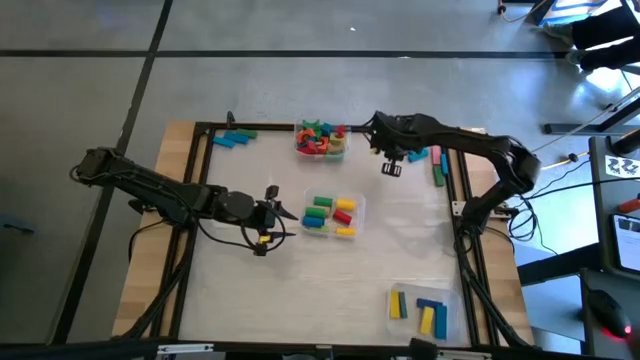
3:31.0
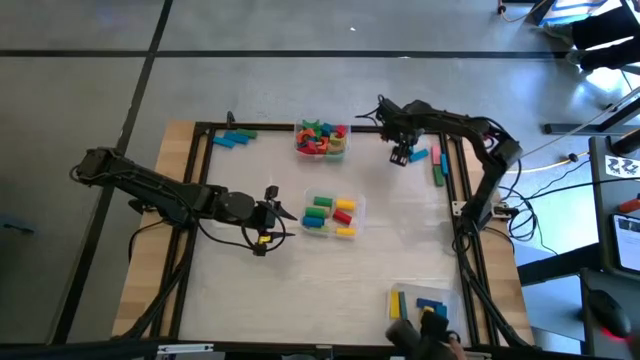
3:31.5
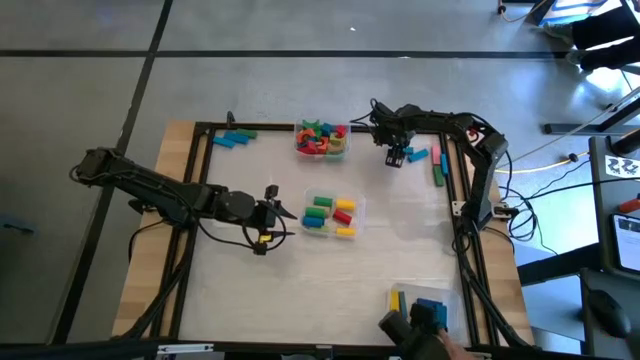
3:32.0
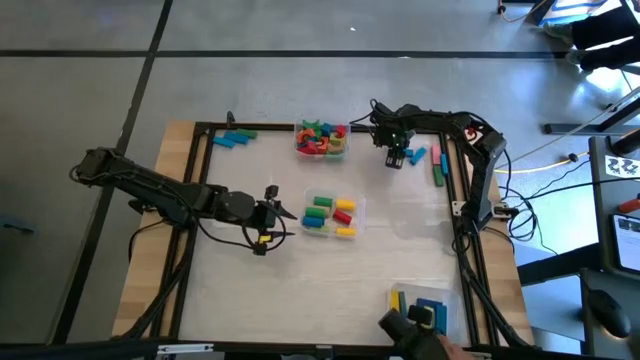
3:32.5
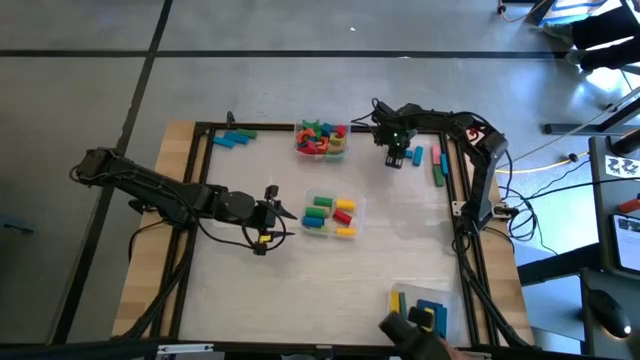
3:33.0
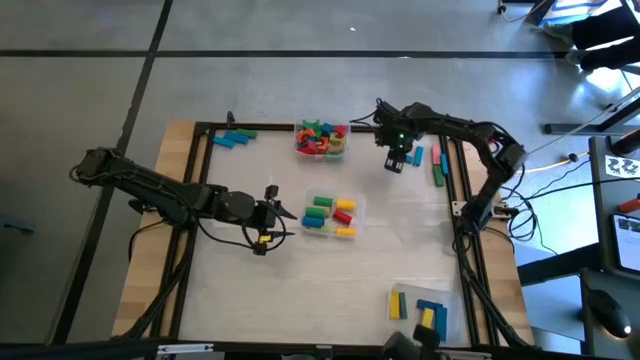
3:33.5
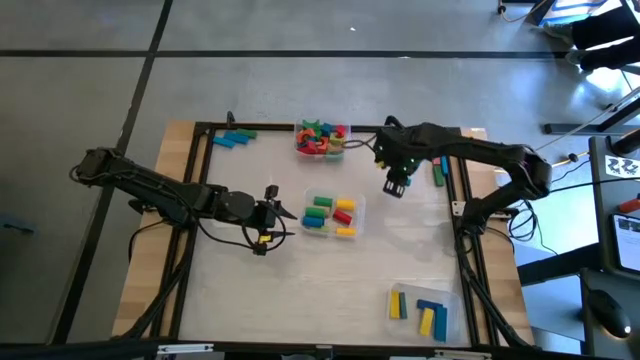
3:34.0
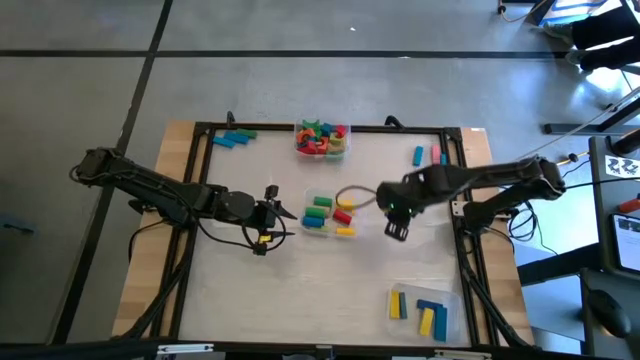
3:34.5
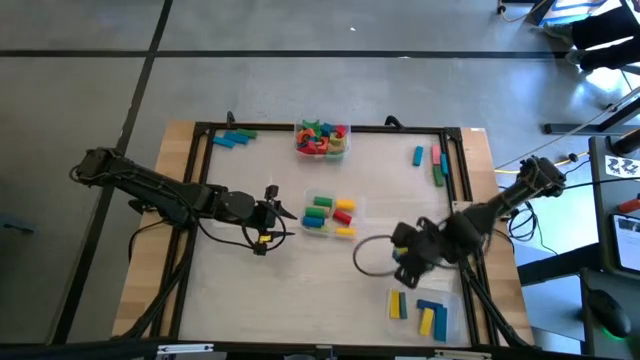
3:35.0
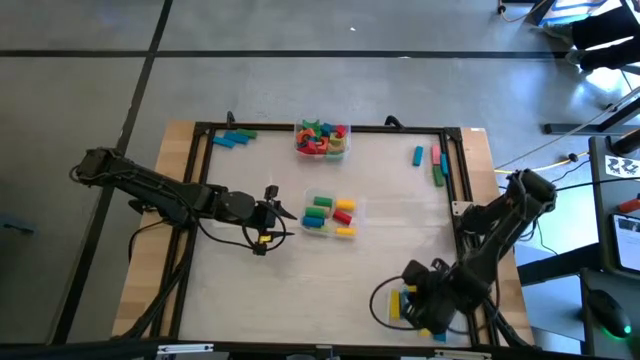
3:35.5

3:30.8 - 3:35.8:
Task: Sort blocks by size
Put the light blue rectangle block into the bottom transparent bin

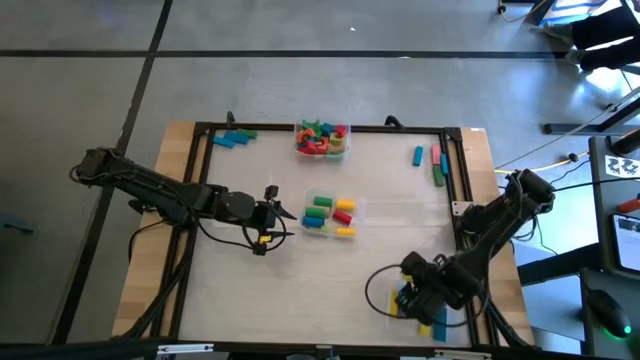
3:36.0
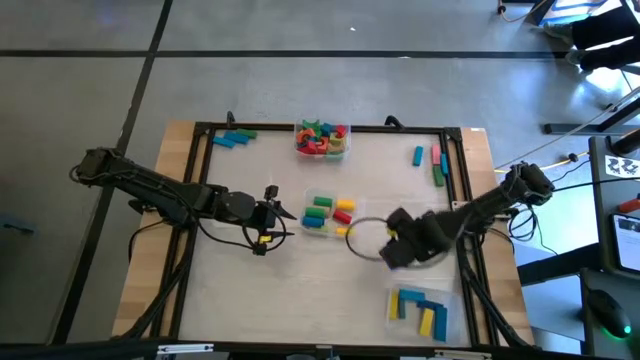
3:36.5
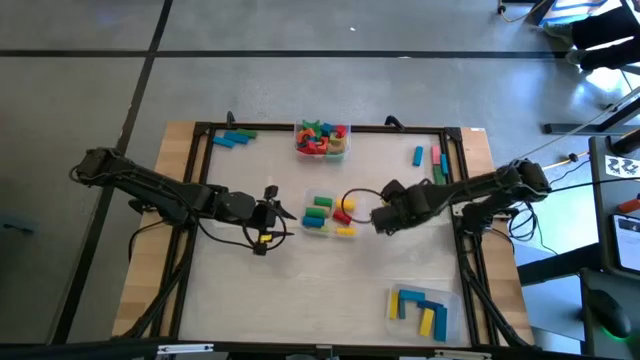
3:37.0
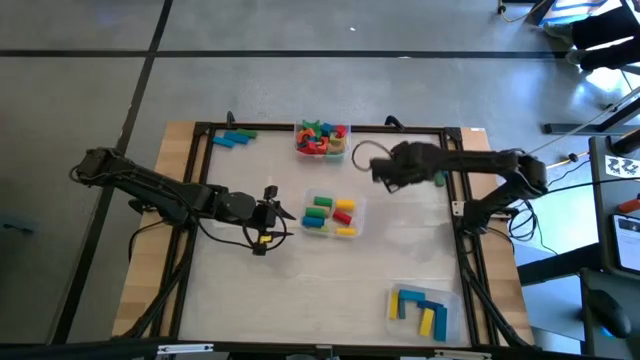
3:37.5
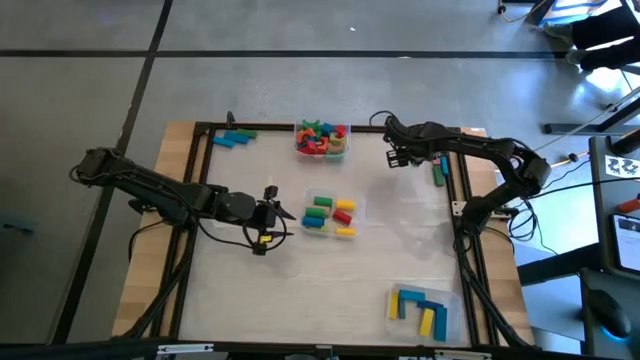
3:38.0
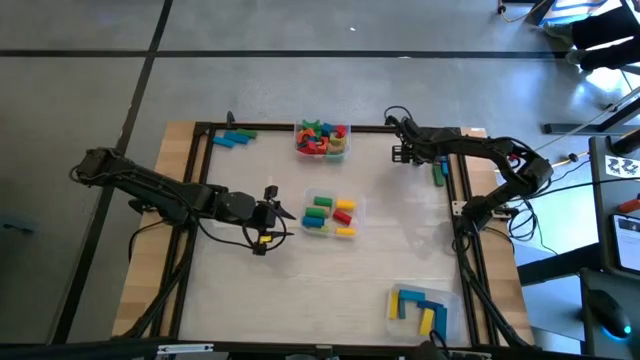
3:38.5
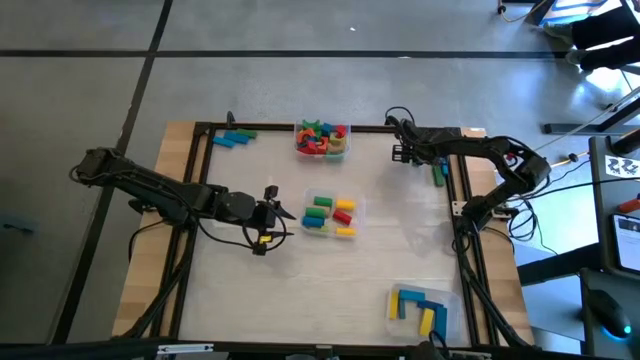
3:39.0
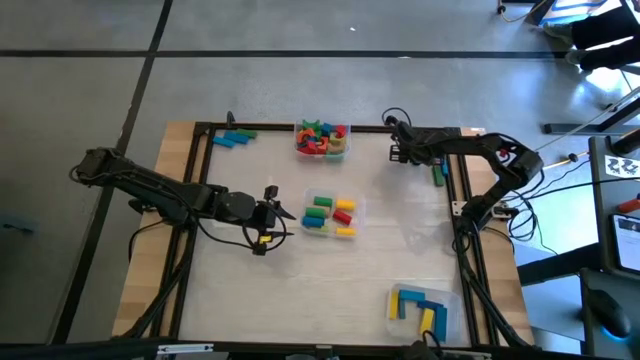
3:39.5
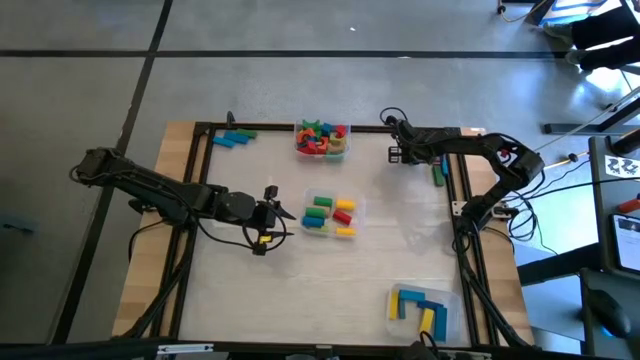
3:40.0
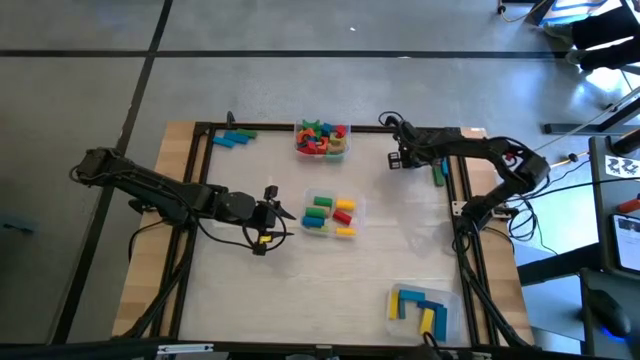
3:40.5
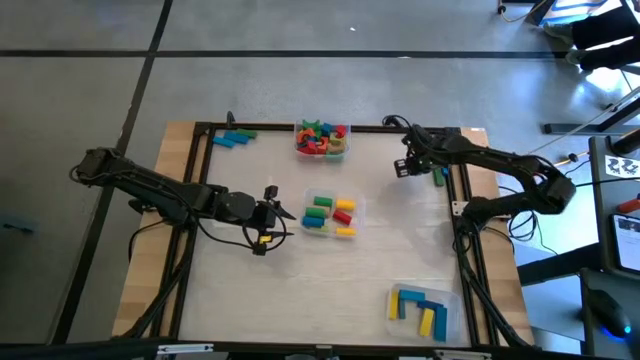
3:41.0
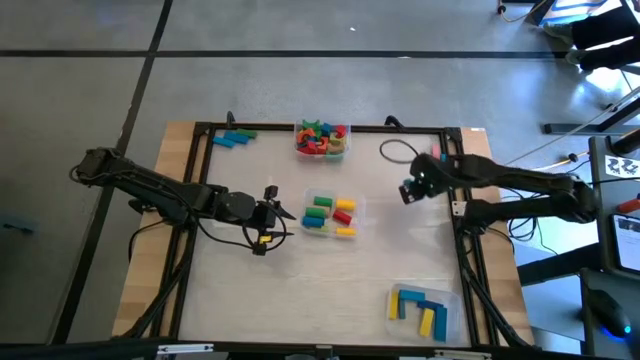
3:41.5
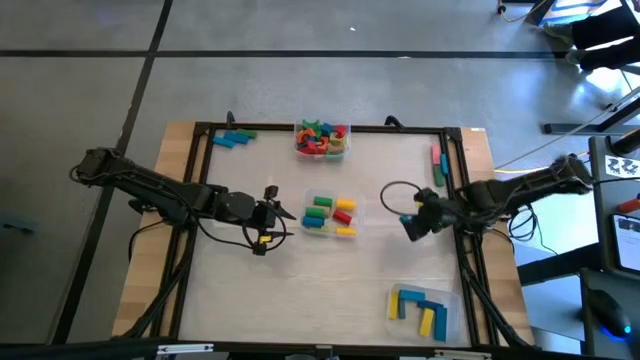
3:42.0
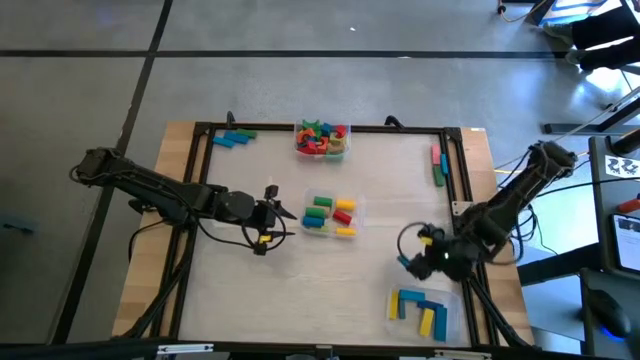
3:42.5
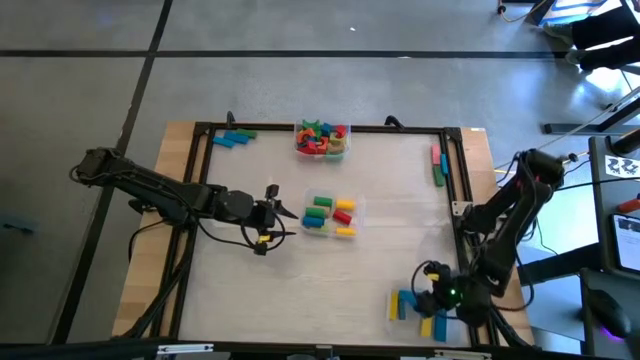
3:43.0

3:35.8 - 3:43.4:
Put the light blue rectangle block into the bottom transparent bin

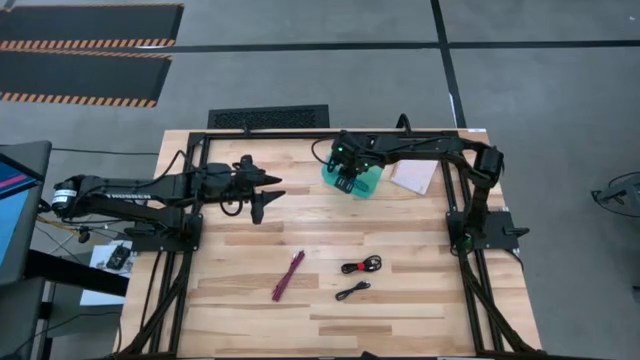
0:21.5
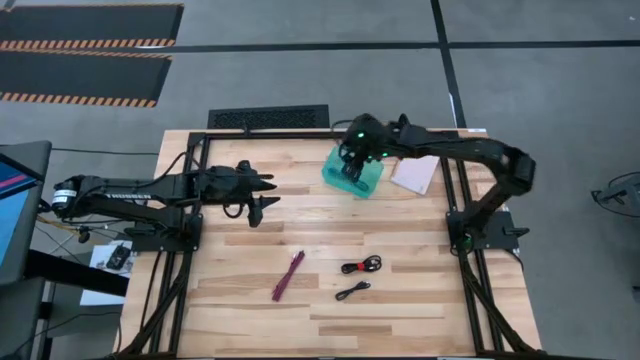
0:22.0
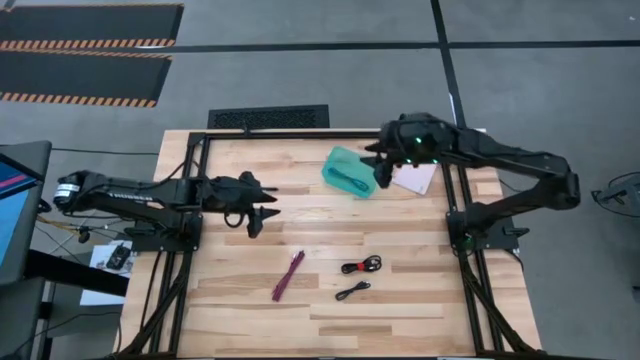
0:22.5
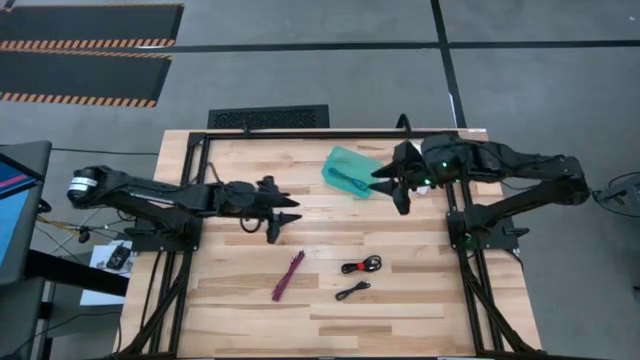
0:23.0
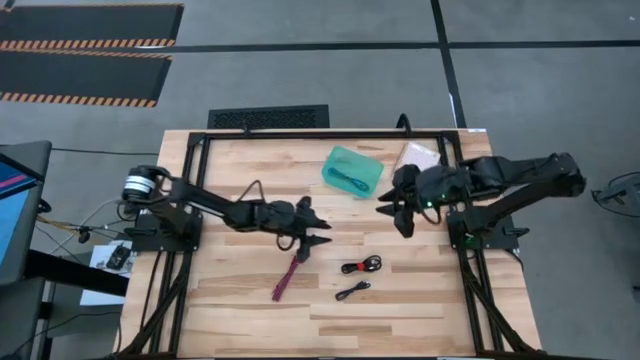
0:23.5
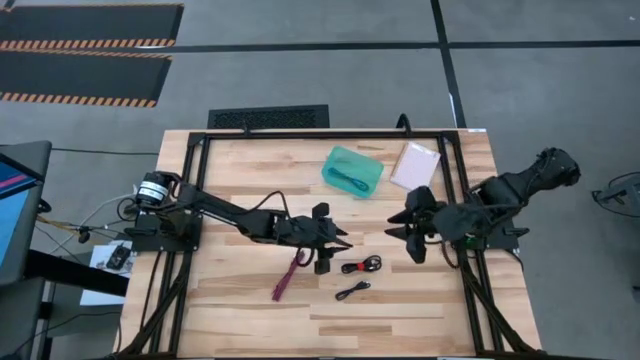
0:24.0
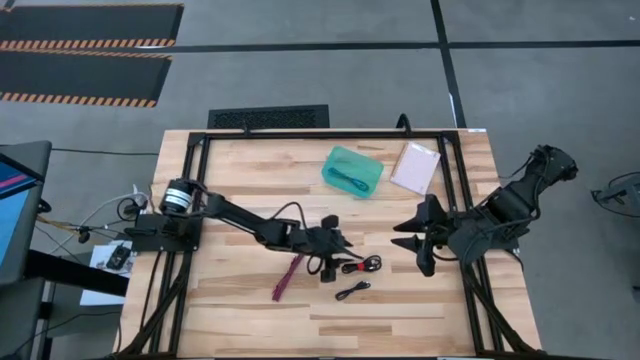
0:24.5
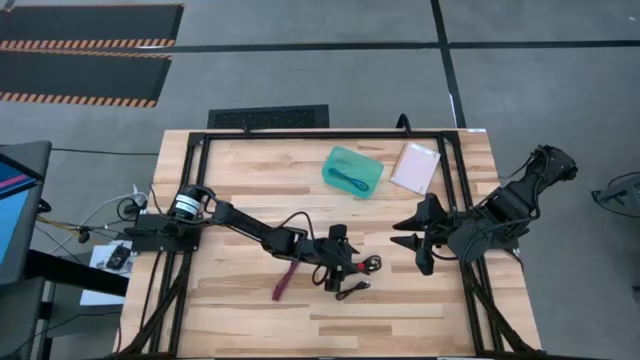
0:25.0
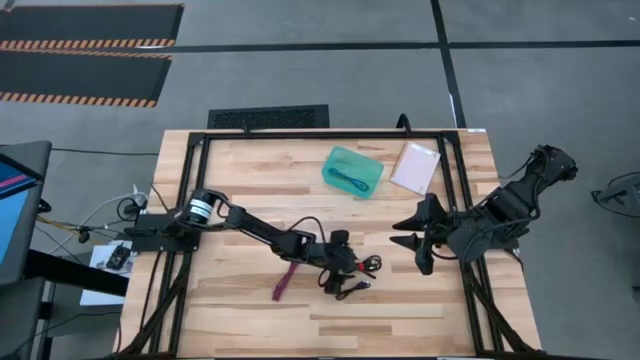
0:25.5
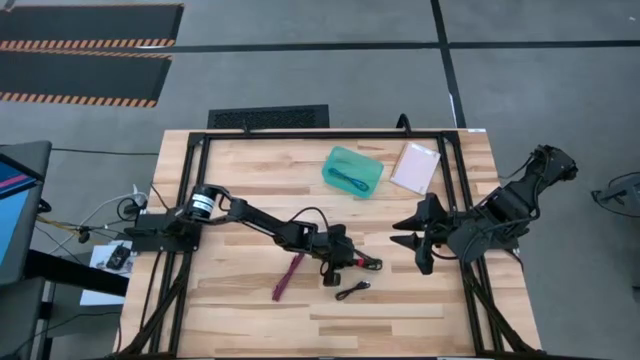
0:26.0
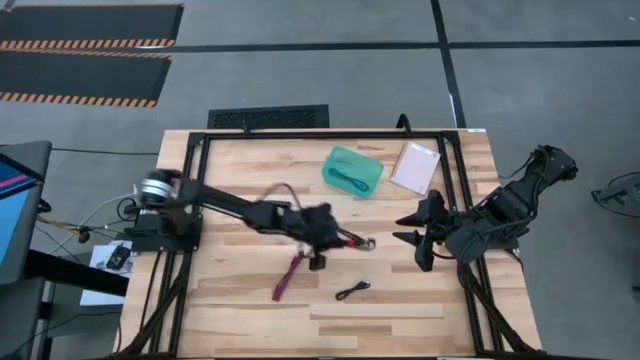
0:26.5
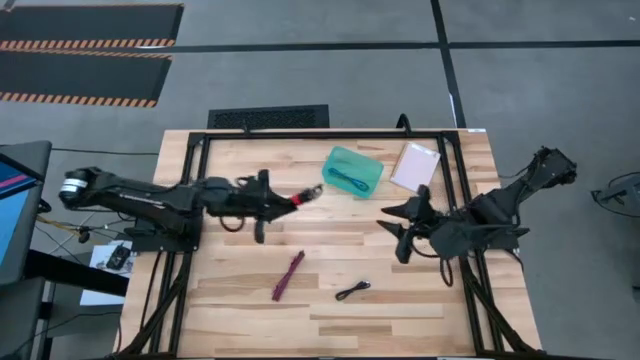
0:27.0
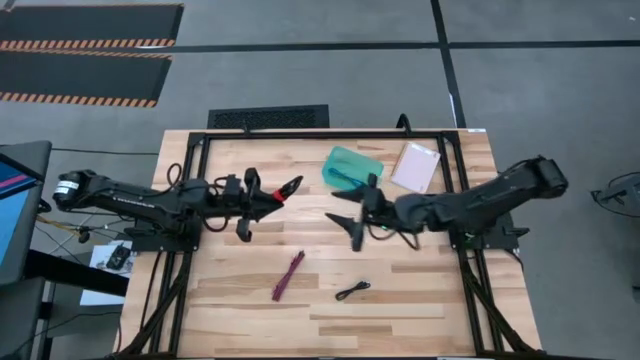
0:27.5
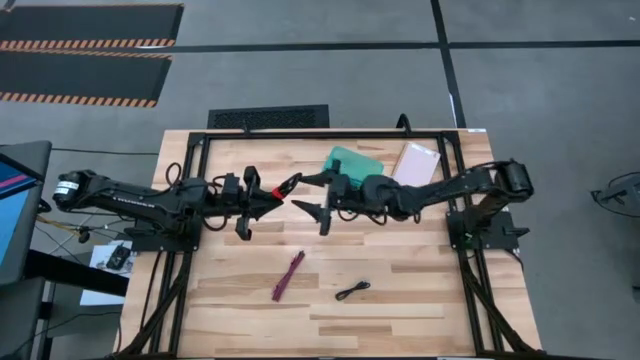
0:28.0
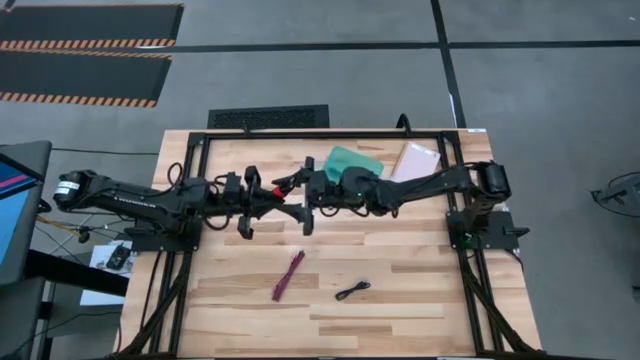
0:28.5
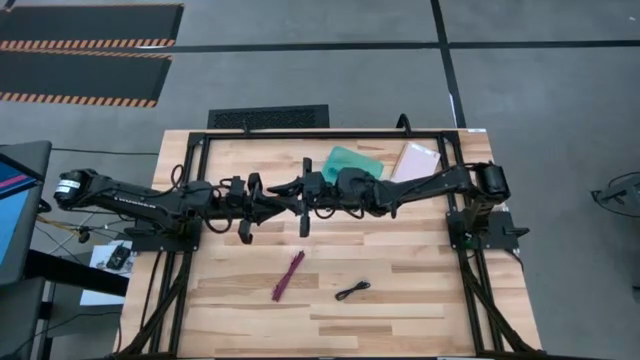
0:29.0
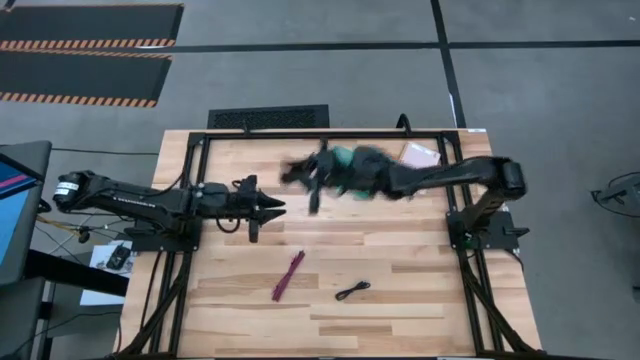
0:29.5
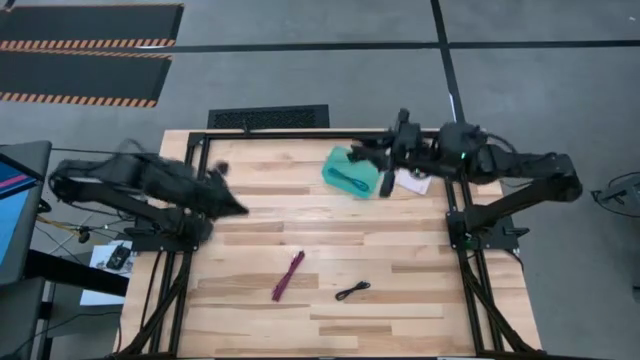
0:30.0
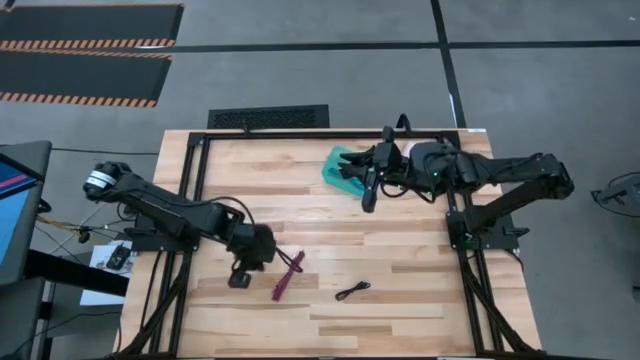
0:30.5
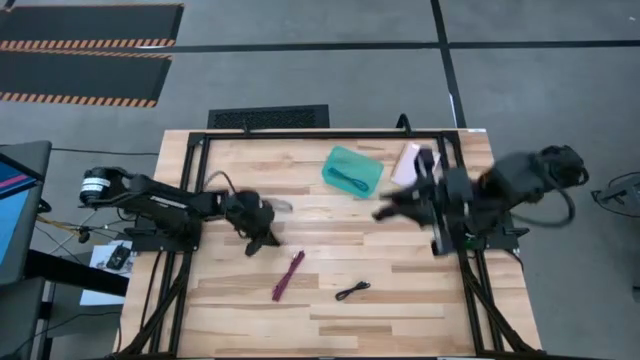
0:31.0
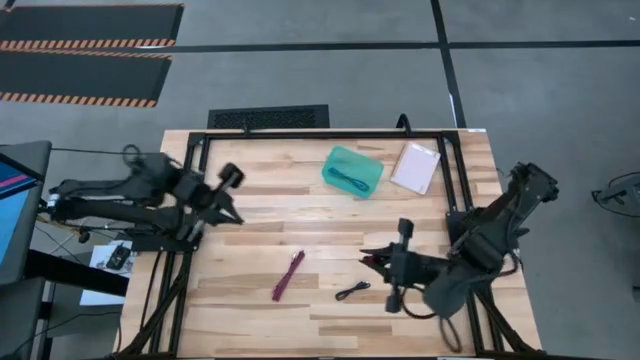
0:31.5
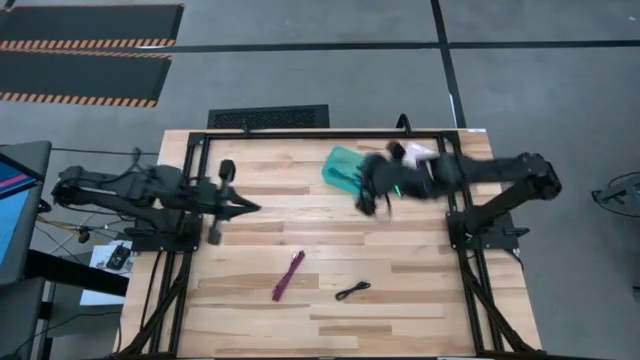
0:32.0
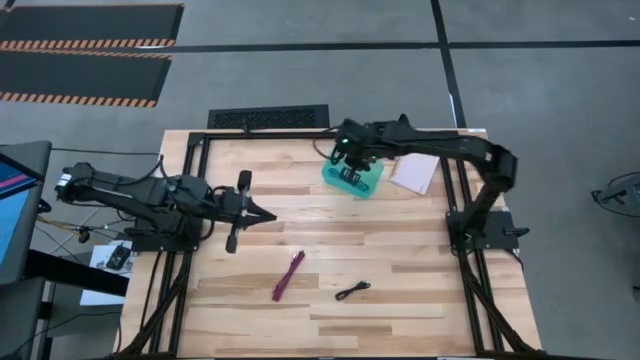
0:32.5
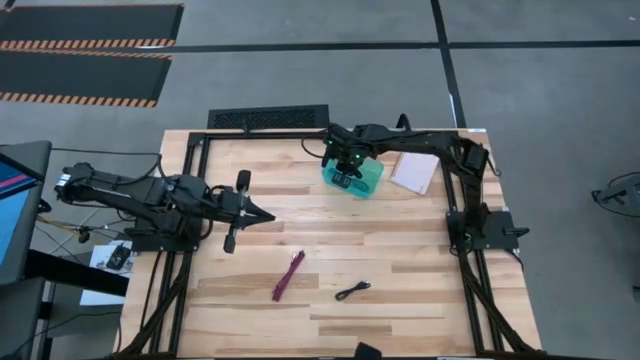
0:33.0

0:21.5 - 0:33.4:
Task: Pick and place USB-C Cables
Put the top black charger cable into the light blue bin
